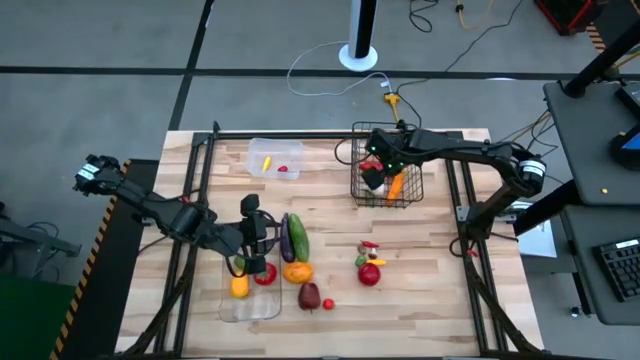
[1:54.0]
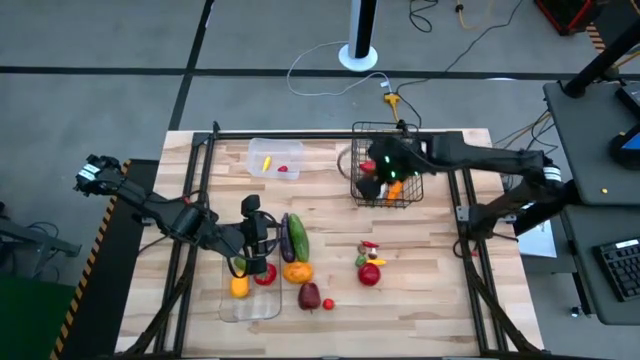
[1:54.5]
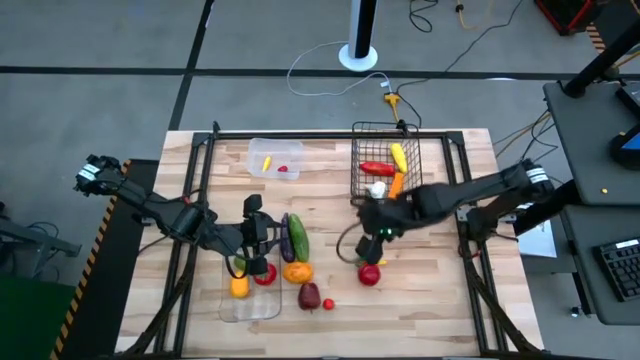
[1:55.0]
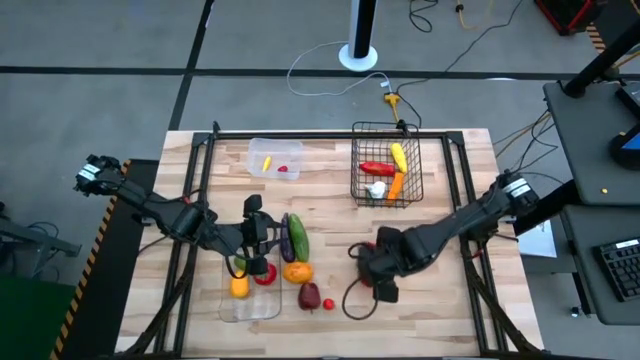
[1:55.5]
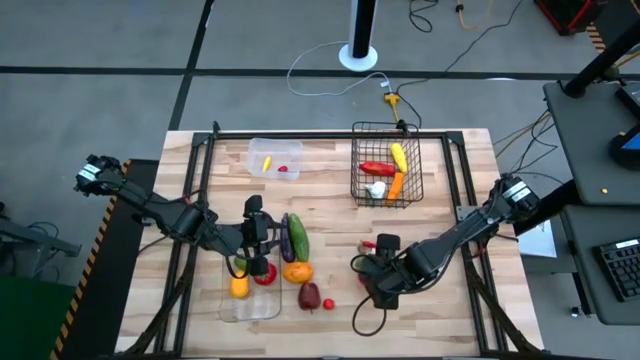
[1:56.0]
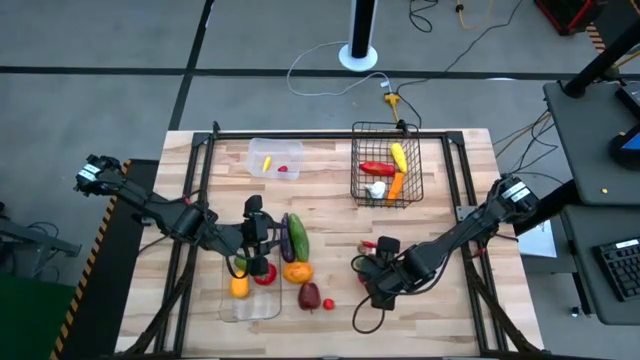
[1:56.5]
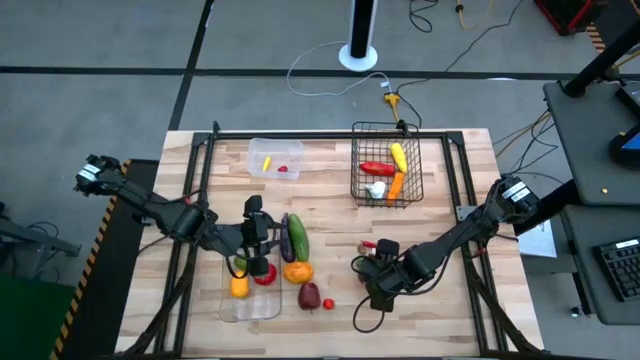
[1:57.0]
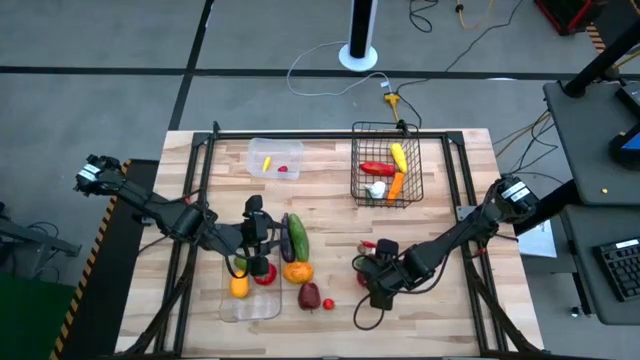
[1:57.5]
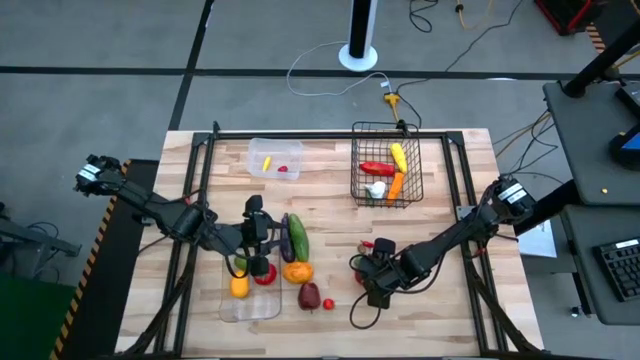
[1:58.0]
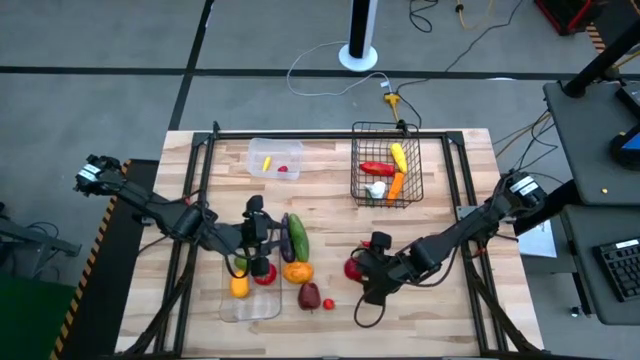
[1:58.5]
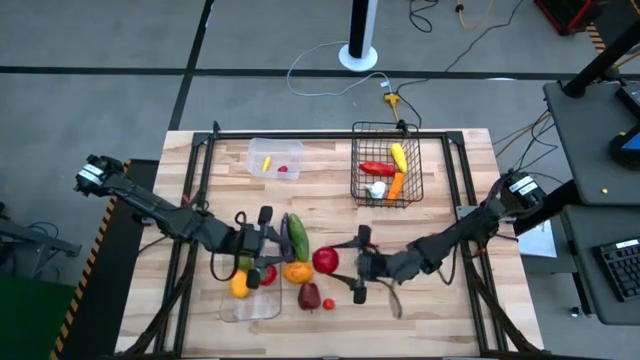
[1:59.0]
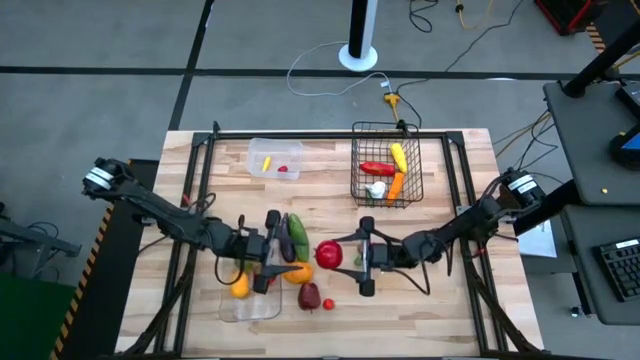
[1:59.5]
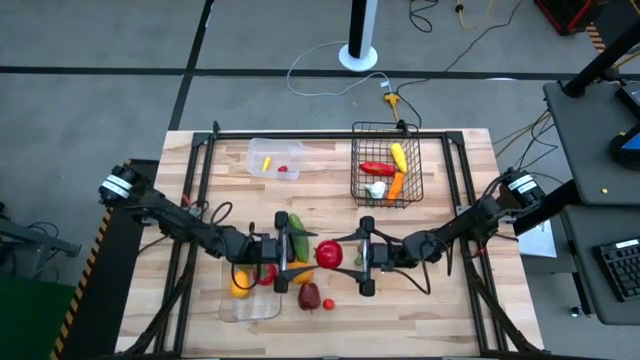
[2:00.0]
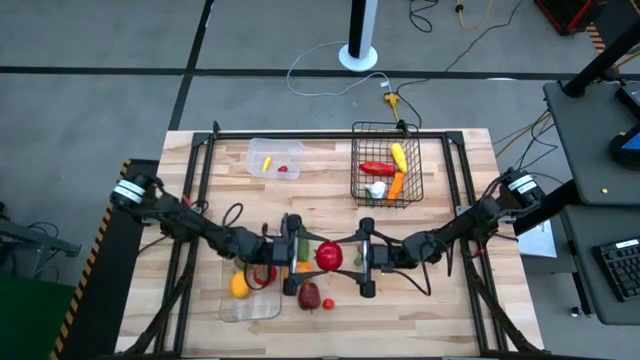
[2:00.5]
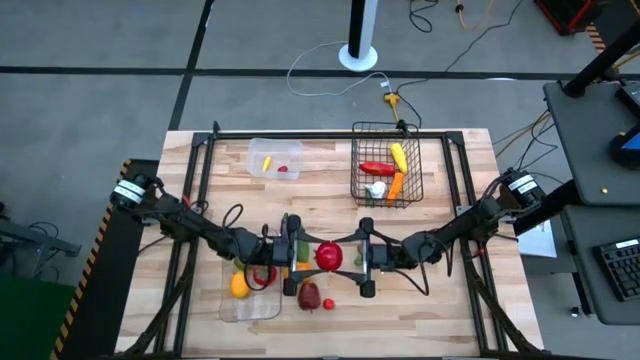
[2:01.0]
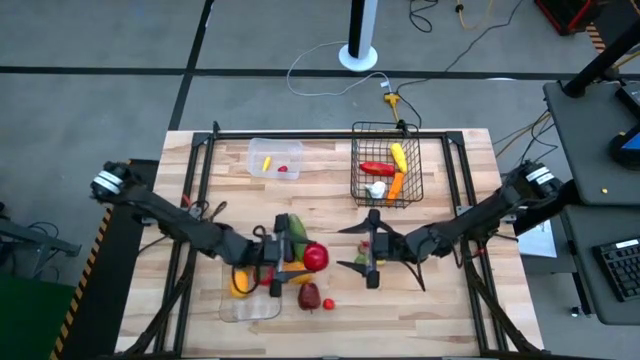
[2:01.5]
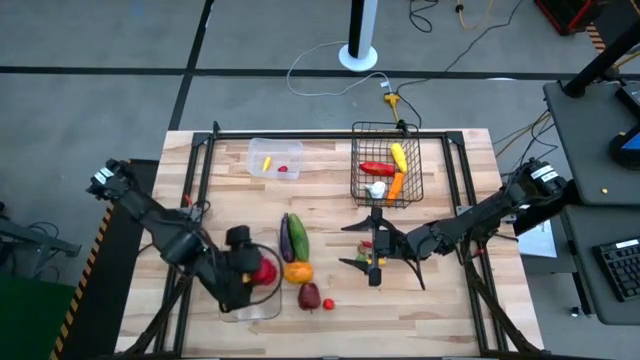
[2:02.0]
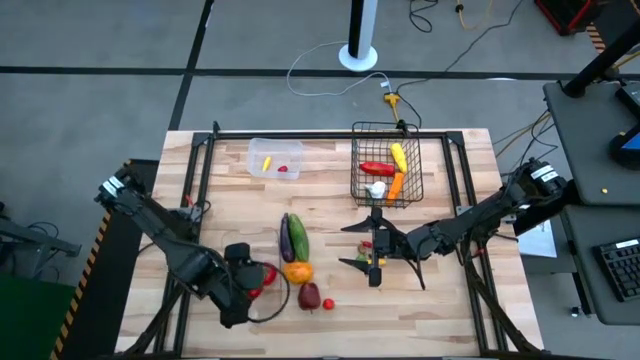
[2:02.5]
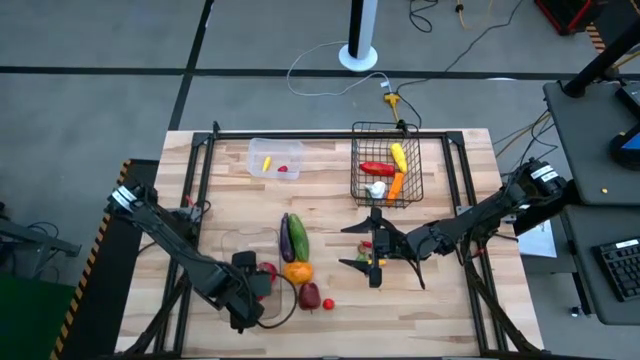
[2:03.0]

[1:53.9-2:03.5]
Task: Sort produce into baskets
Put the tomato into the transparent bin

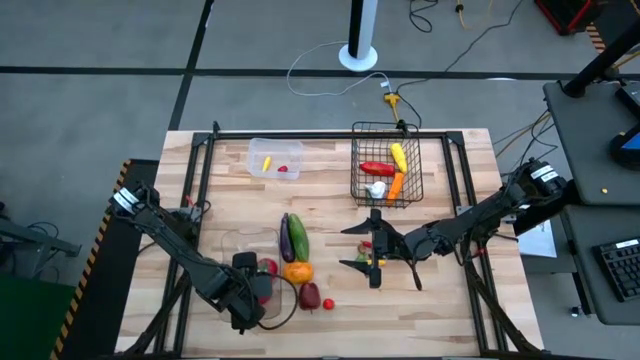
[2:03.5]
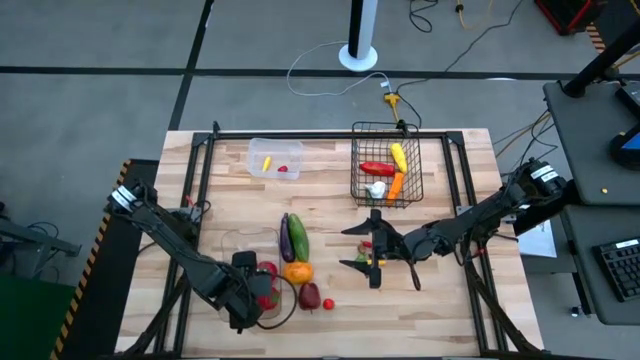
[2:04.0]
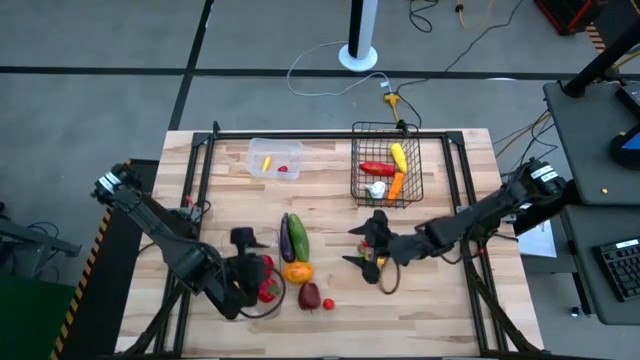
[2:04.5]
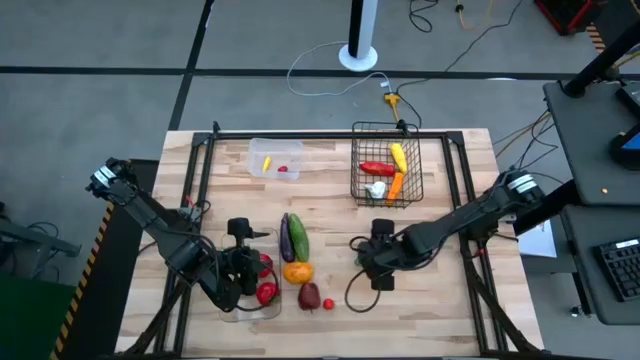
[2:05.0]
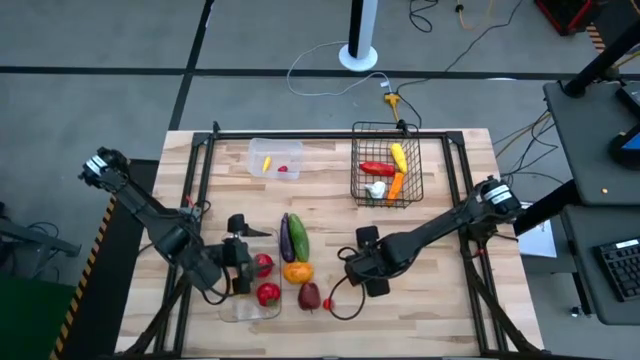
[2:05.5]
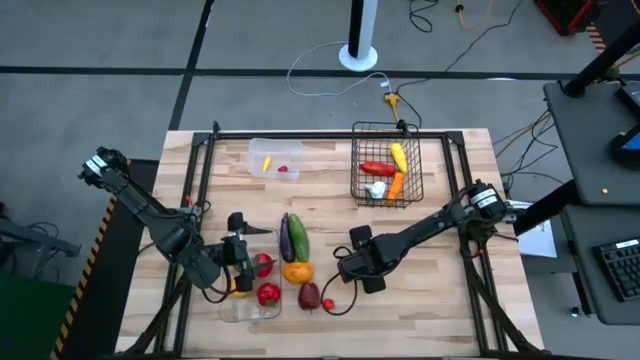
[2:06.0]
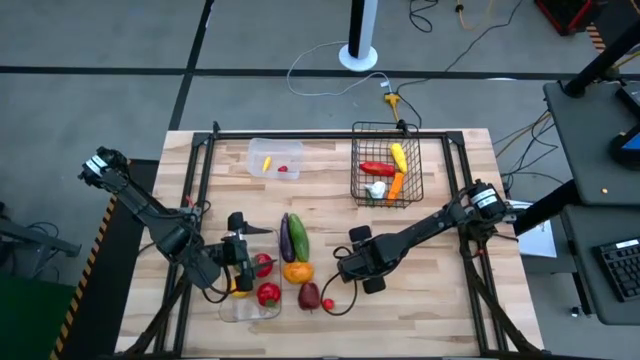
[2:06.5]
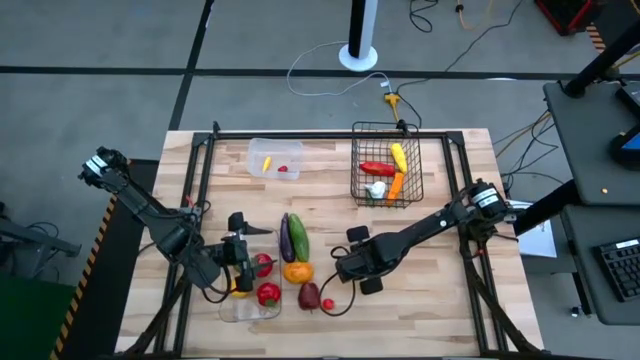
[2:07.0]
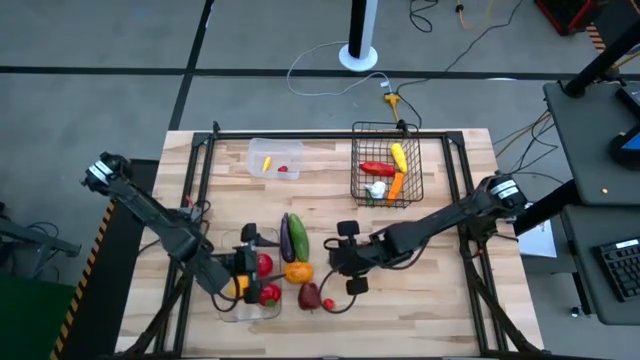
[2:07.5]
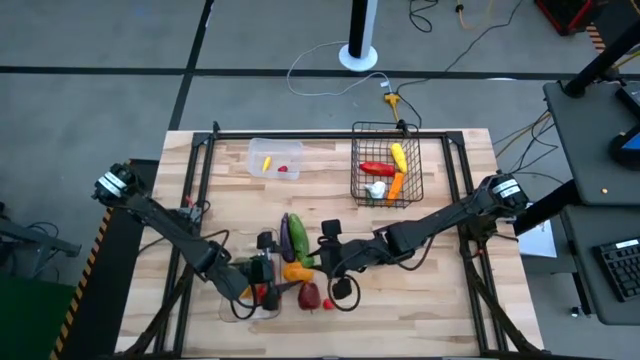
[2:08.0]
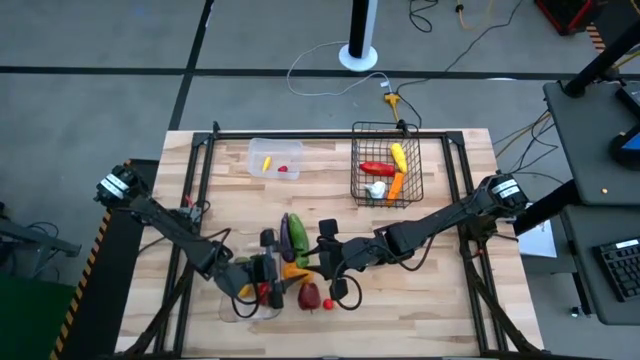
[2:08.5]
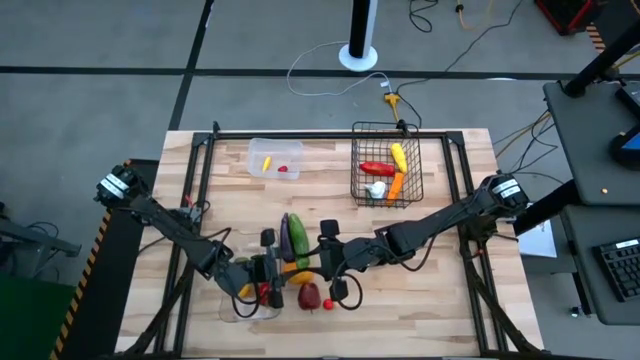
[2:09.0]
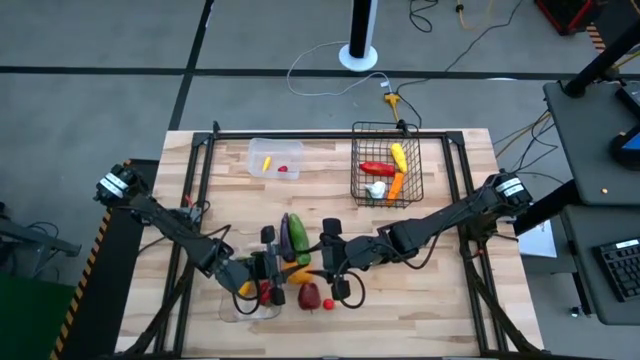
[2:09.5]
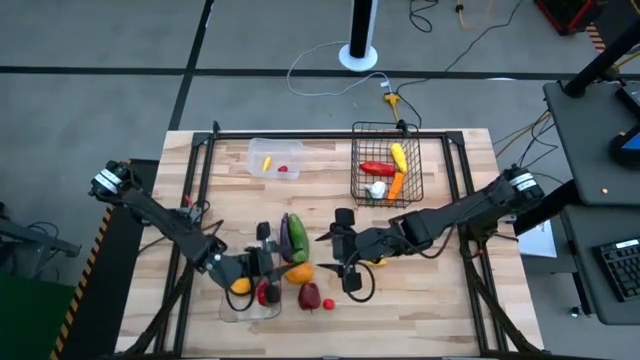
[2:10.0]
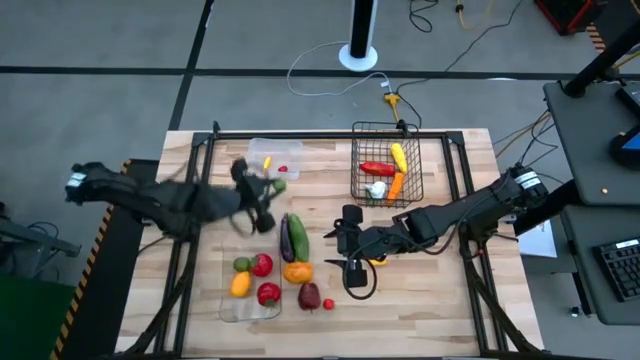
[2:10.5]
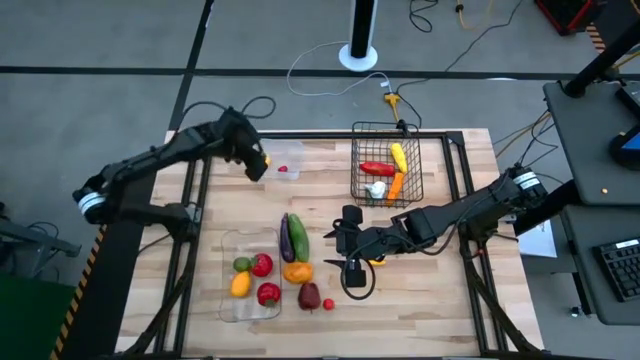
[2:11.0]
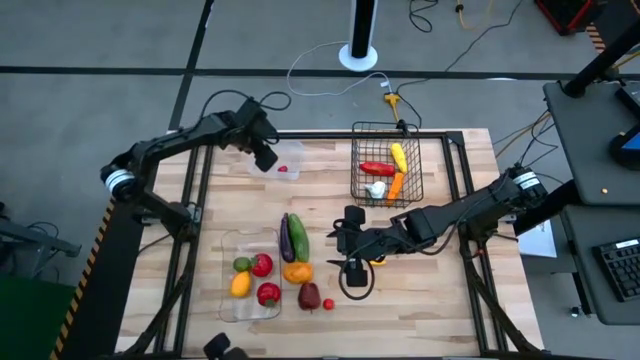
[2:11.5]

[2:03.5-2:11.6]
Put the green bell pepper into the white bin

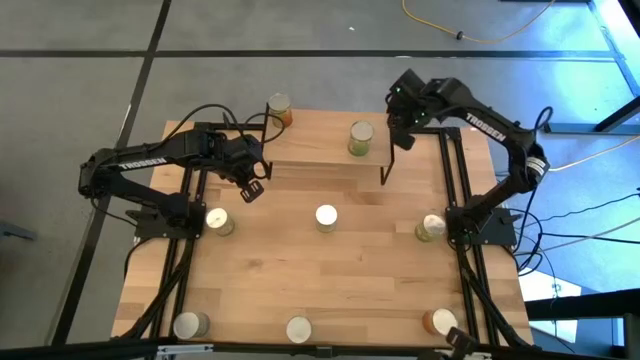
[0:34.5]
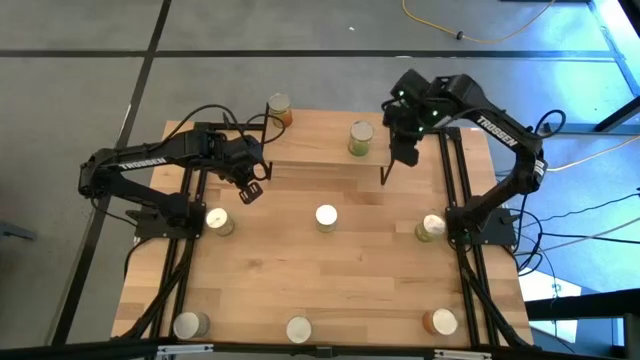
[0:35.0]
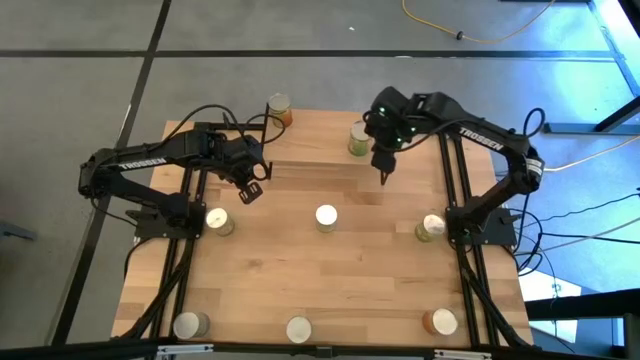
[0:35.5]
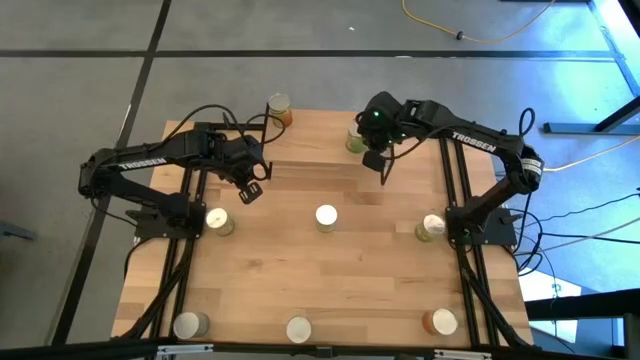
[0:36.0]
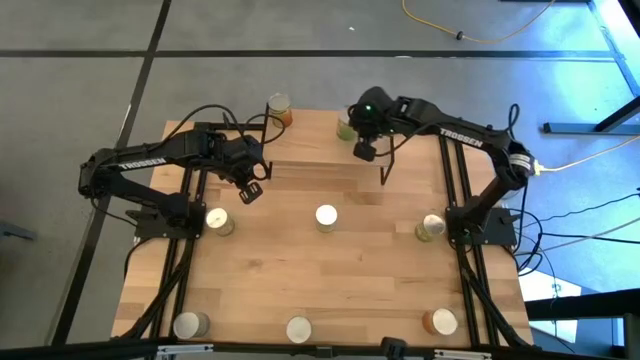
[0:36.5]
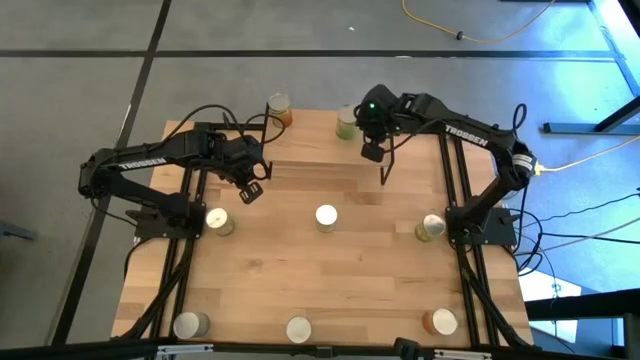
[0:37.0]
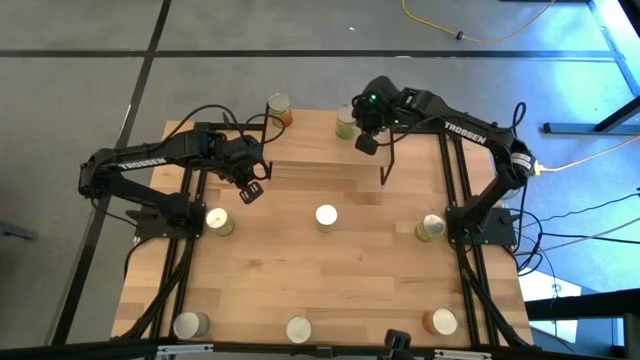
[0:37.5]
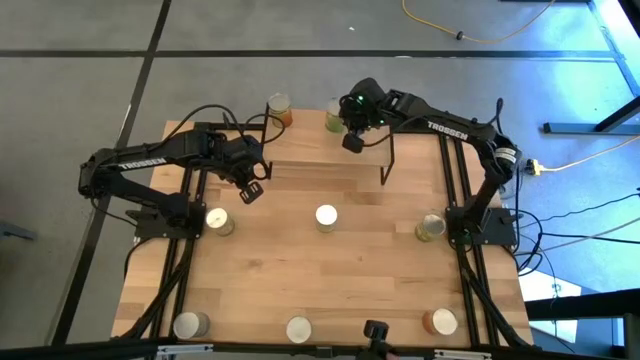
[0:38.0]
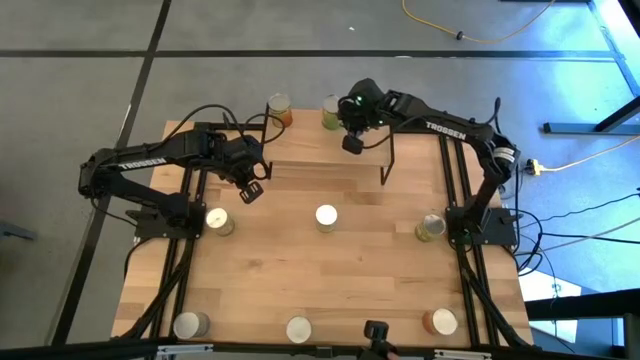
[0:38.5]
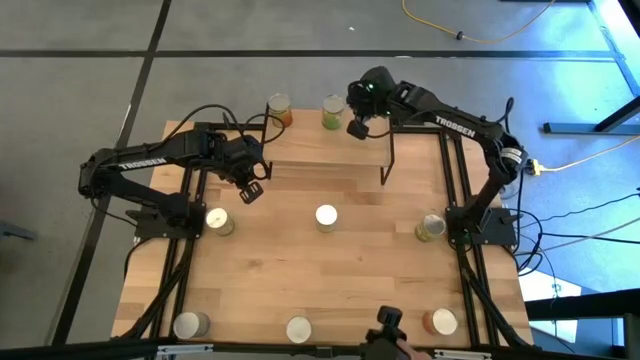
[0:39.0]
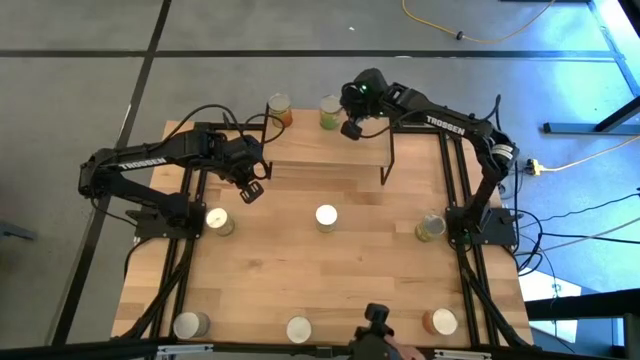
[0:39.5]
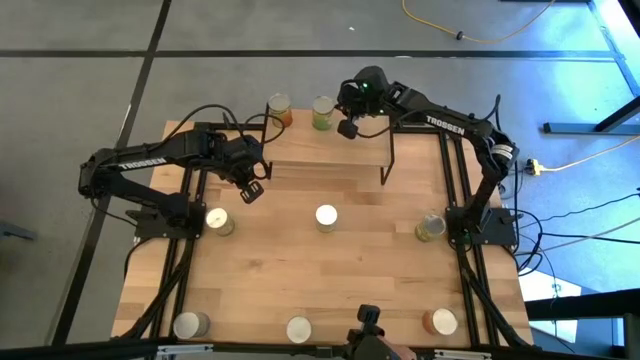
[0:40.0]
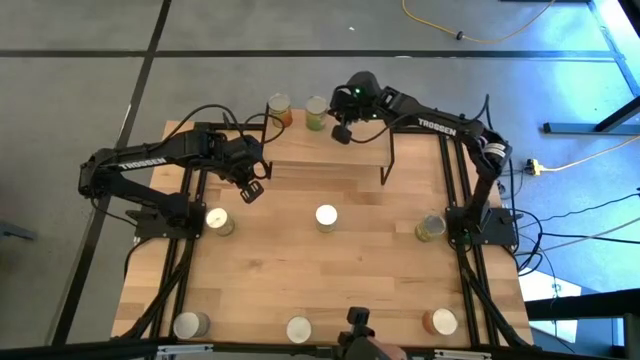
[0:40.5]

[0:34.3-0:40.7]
Task: Pick and place cans onto a shelf
Adjust the canned oranges from the shelf
